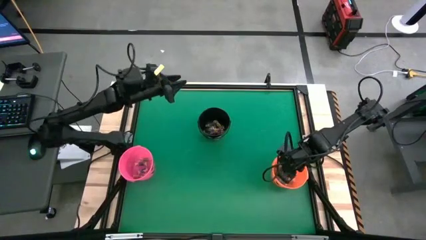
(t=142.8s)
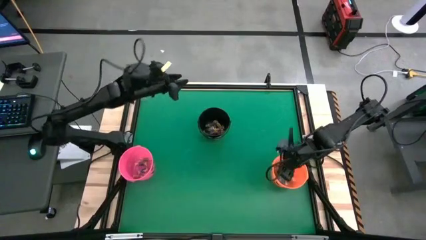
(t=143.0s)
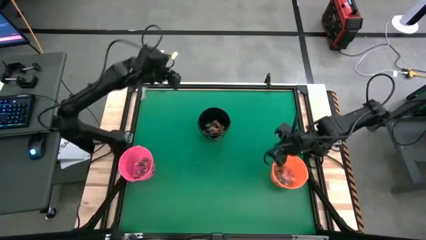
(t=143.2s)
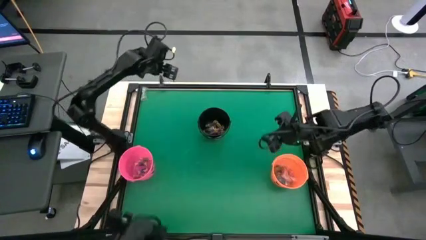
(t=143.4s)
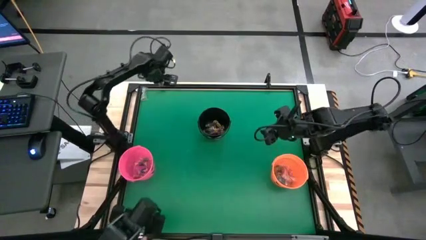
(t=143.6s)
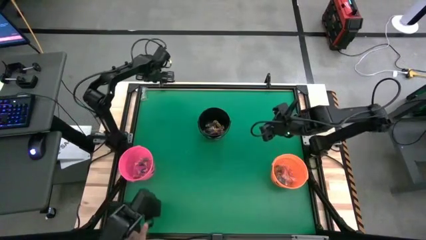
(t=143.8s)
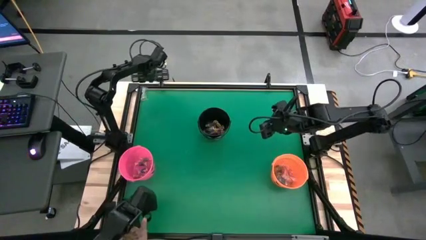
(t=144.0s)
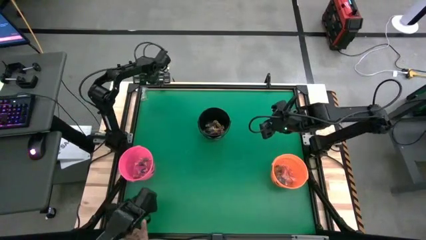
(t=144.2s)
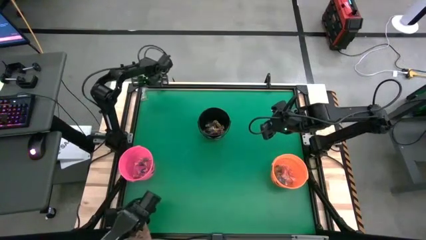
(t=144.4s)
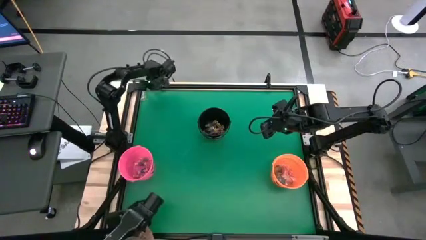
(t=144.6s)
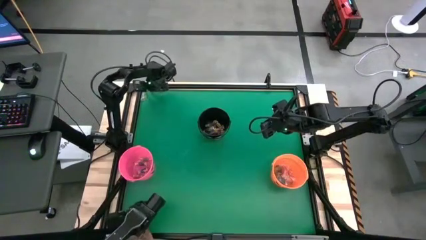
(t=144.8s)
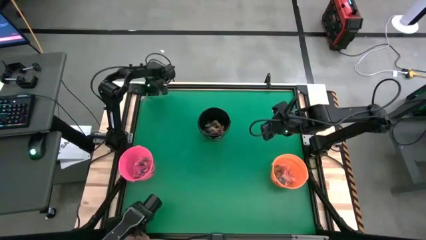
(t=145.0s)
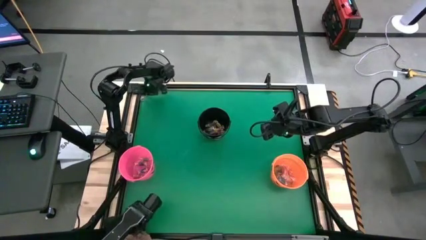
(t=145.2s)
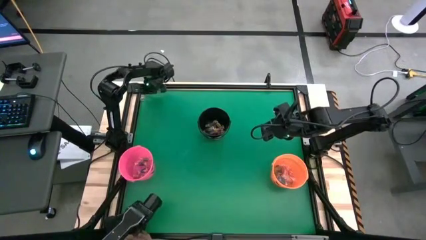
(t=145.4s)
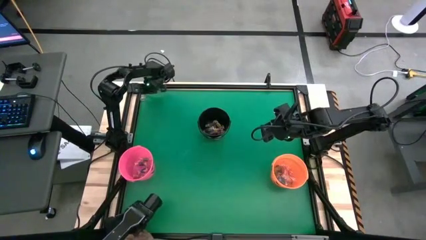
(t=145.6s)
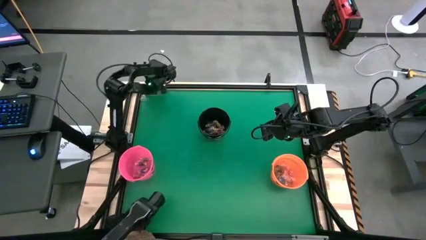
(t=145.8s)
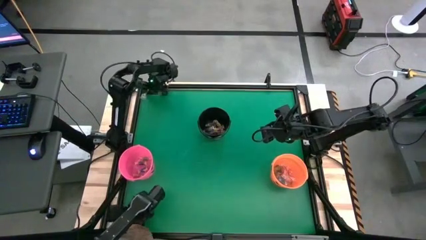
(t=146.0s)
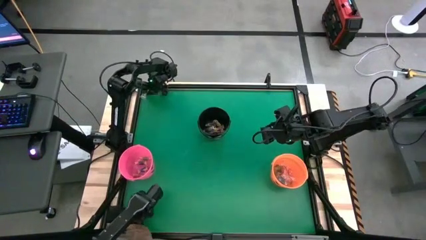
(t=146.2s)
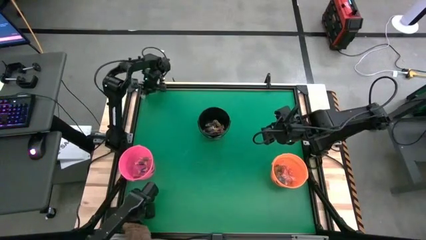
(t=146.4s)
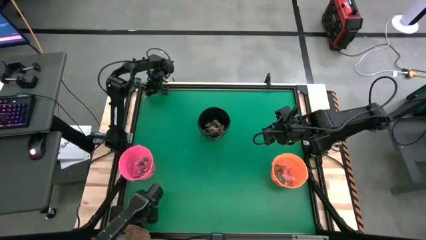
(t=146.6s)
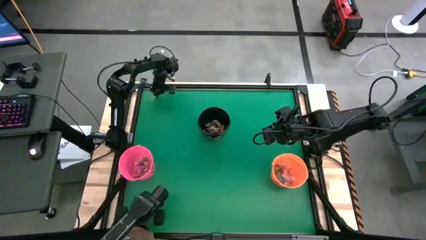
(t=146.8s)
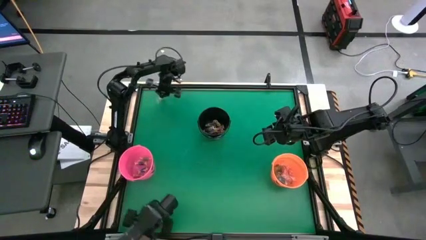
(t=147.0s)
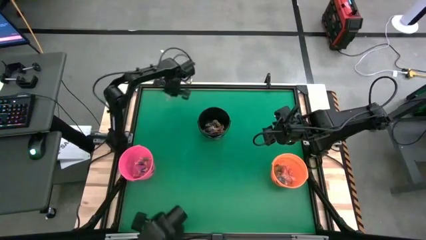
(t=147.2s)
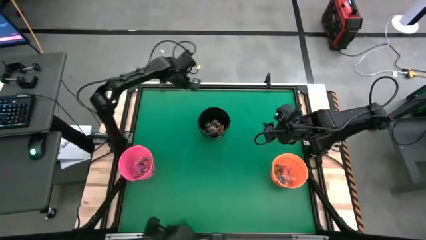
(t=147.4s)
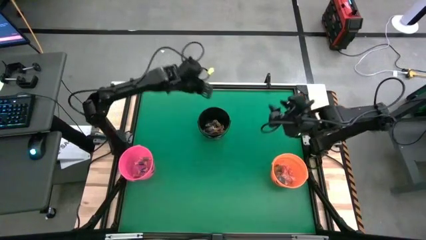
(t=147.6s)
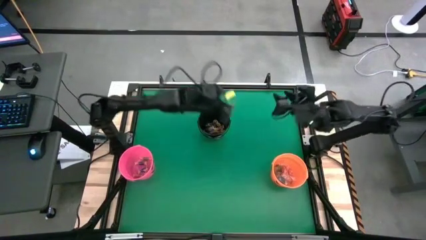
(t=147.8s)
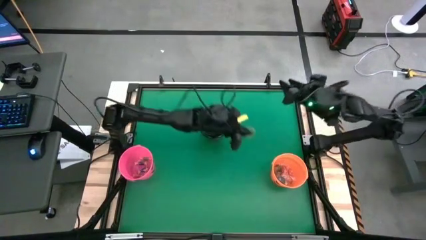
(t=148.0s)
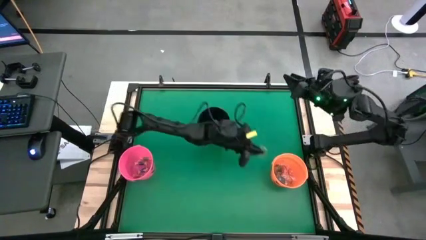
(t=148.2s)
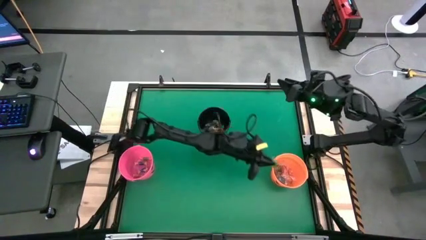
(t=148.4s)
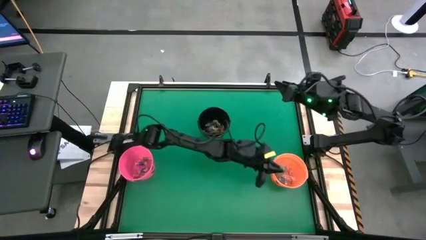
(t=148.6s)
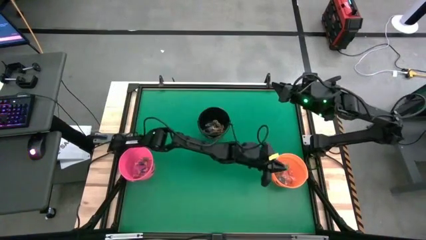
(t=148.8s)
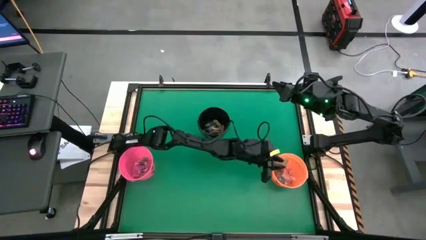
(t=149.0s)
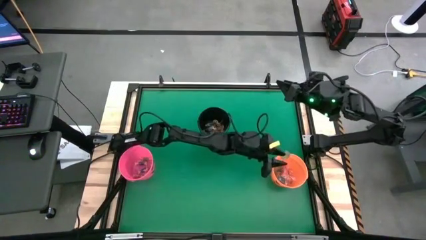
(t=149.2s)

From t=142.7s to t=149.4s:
Task: Sort candy by brand, put in halloween buckets
Put the green gummy into the orange bucket

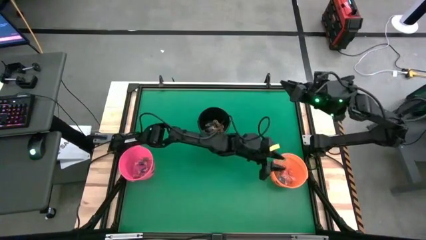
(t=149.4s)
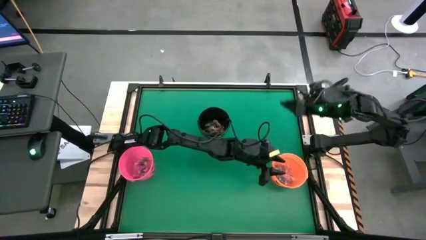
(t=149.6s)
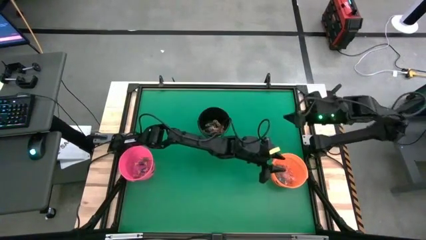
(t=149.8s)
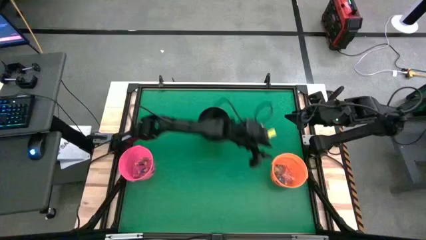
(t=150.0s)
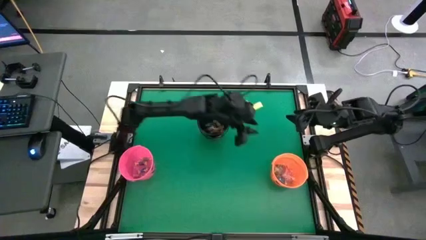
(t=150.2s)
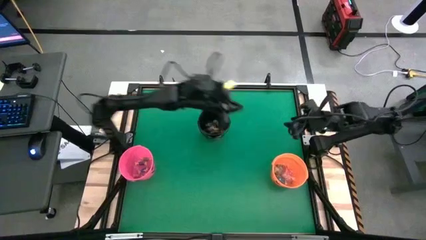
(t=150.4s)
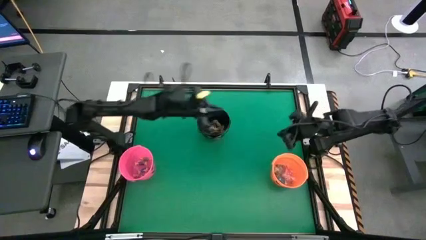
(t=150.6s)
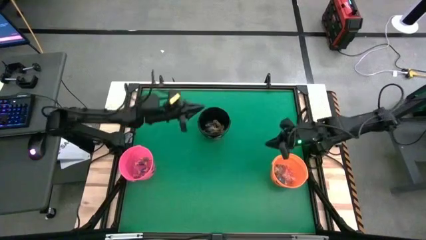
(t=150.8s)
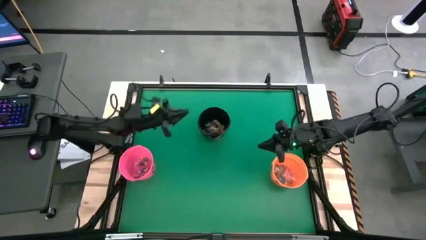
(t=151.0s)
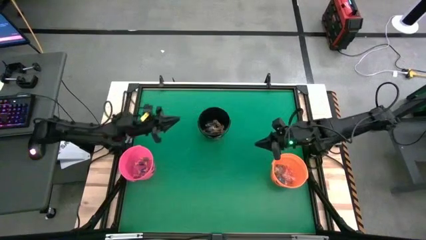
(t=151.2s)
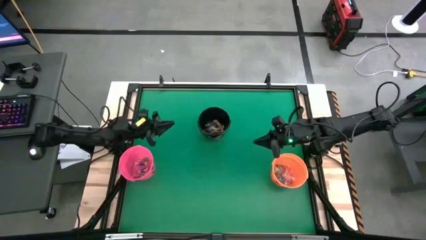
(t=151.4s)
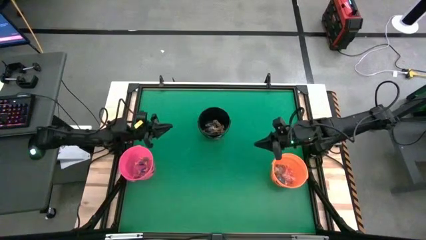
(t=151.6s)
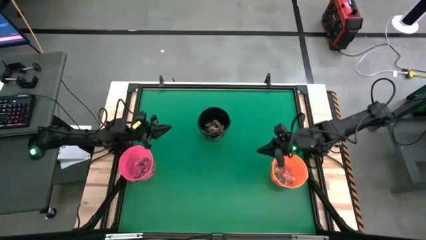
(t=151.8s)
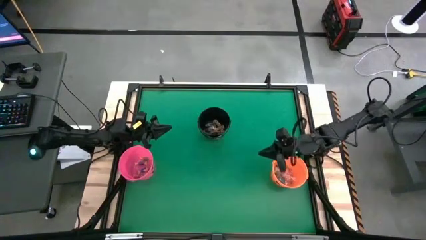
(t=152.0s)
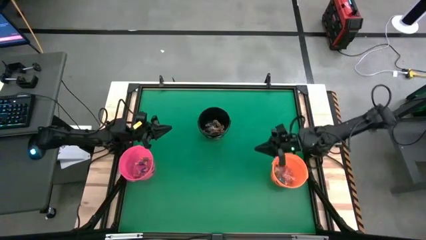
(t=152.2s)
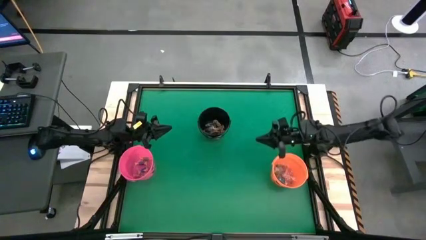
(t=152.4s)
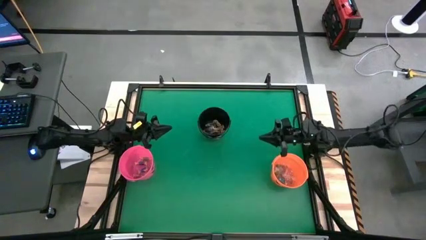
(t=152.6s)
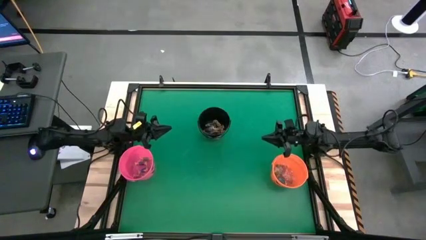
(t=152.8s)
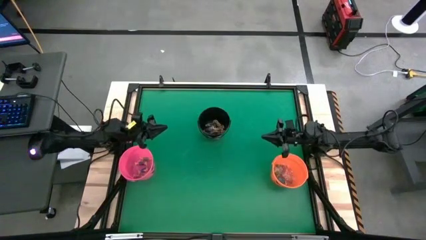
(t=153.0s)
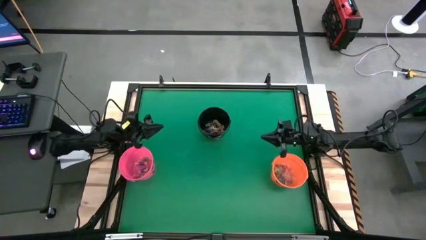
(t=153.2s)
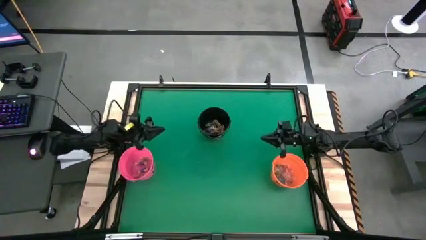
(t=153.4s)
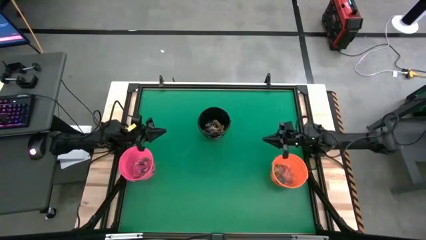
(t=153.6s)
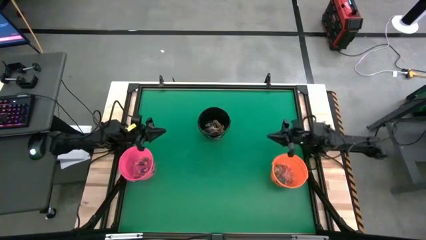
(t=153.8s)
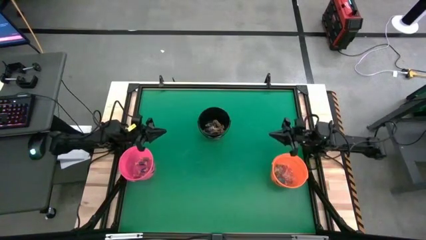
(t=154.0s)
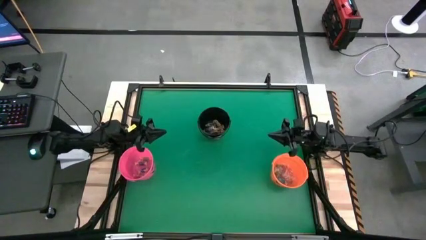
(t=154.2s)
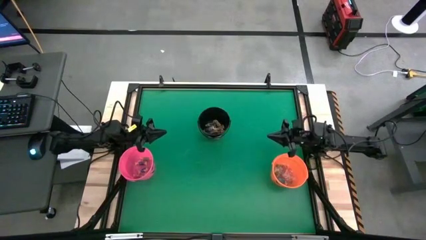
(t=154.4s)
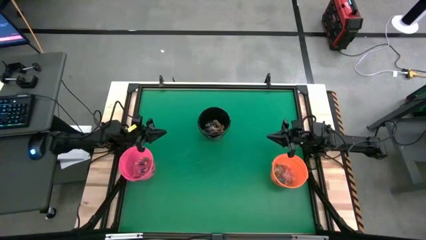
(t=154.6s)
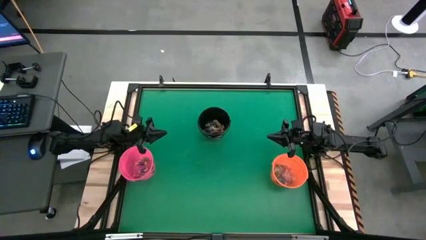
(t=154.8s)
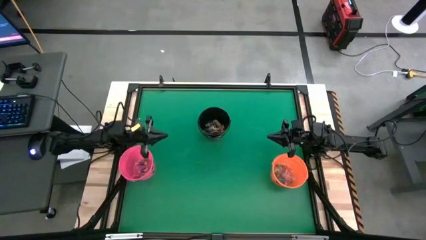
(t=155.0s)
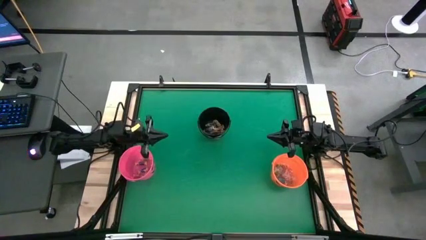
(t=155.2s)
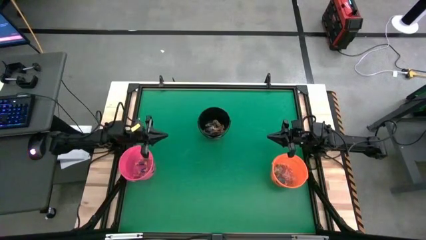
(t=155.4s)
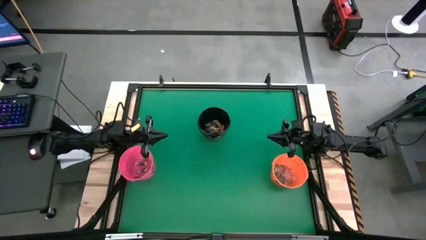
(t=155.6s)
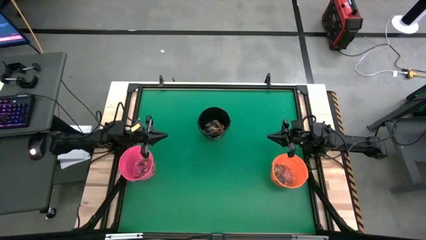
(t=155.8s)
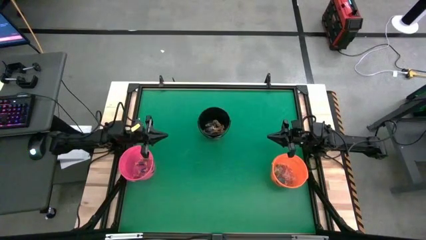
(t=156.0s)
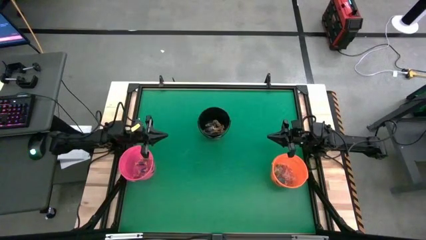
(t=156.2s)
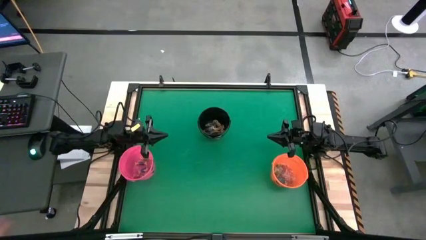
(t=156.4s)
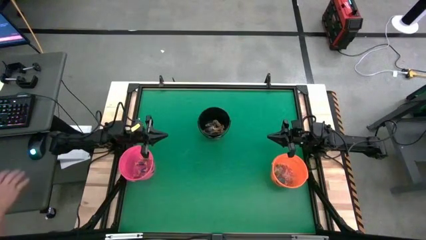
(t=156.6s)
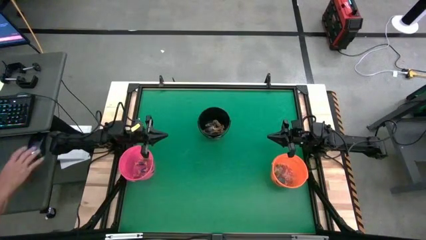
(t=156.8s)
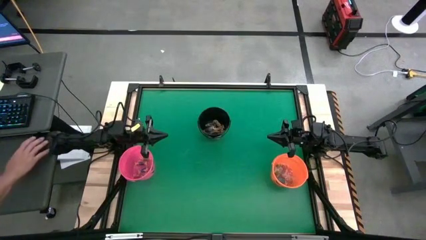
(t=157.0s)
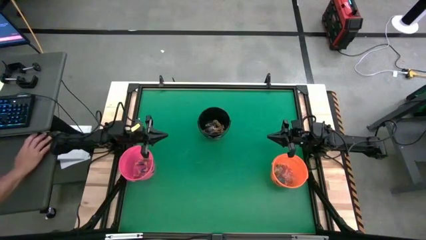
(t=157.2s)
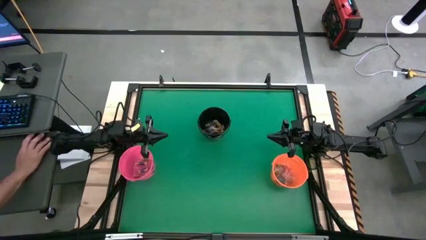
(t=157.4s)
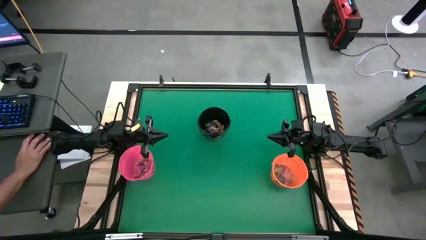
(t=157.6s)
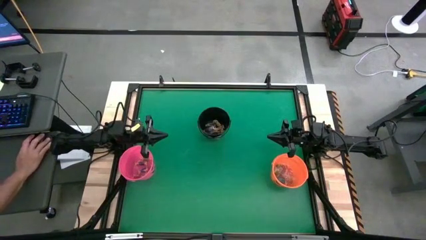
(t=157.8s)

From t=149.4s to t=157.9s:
Return to Home Position
